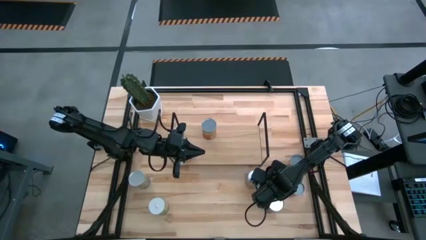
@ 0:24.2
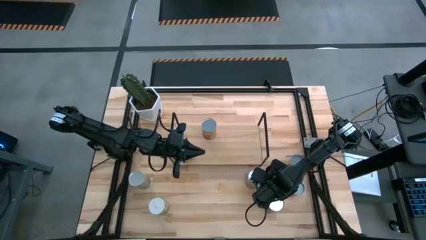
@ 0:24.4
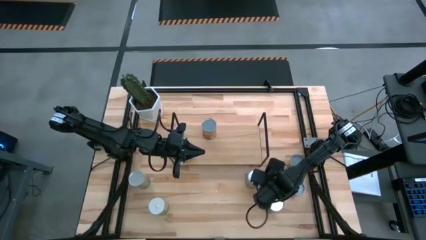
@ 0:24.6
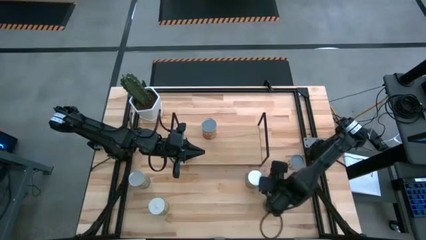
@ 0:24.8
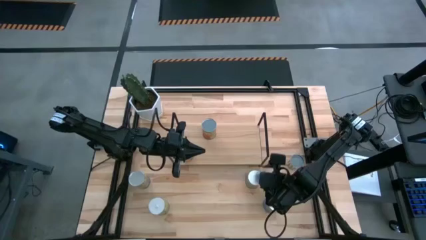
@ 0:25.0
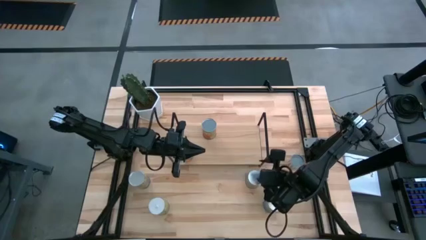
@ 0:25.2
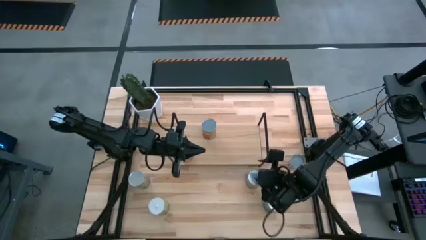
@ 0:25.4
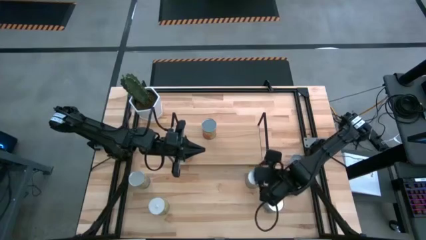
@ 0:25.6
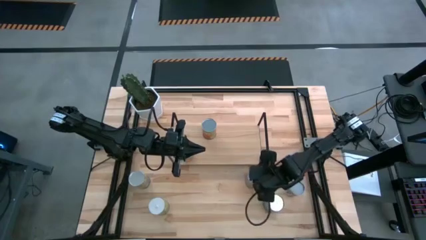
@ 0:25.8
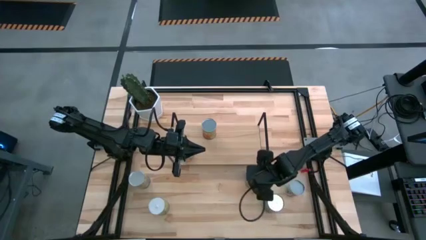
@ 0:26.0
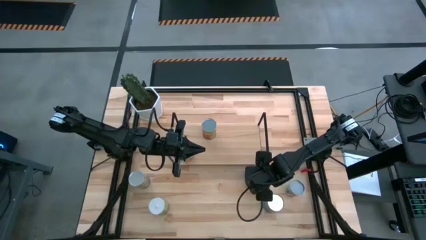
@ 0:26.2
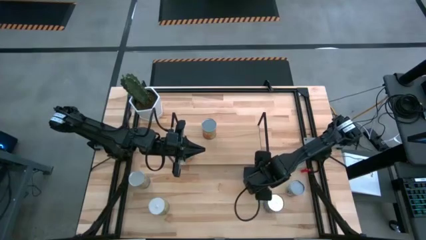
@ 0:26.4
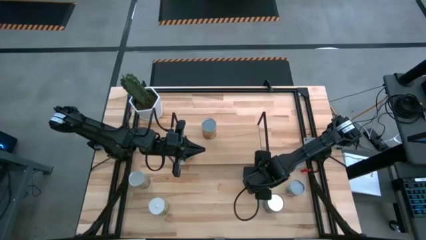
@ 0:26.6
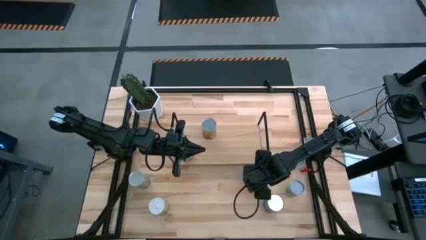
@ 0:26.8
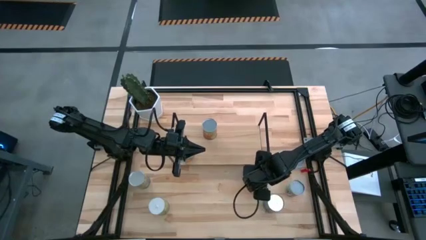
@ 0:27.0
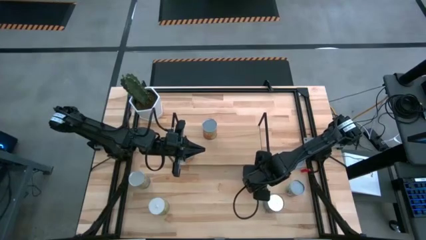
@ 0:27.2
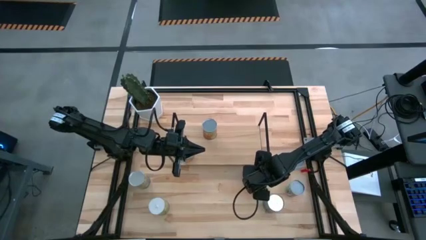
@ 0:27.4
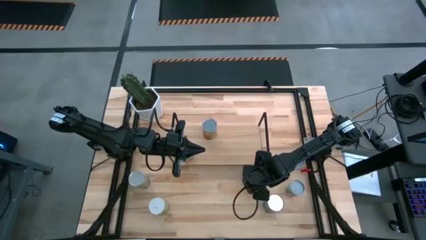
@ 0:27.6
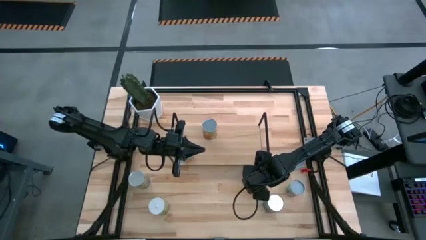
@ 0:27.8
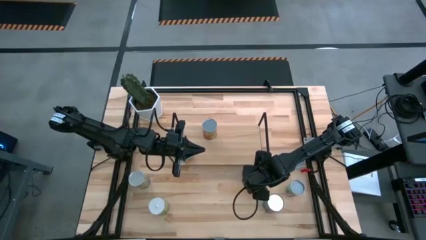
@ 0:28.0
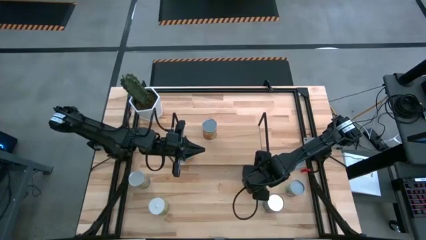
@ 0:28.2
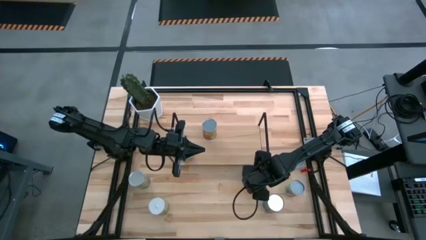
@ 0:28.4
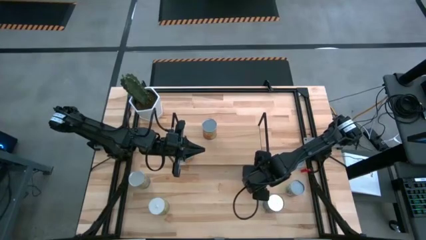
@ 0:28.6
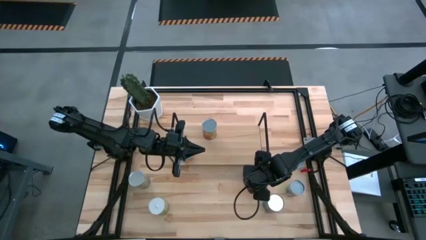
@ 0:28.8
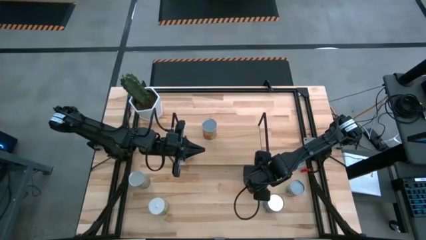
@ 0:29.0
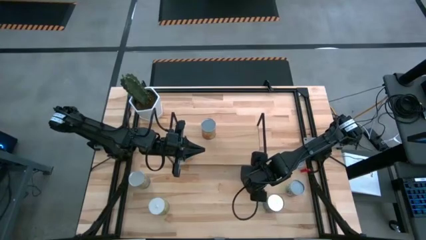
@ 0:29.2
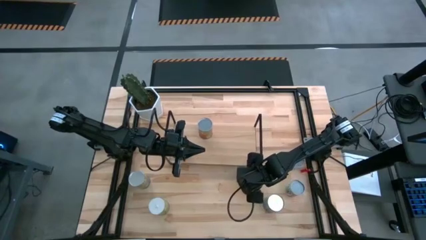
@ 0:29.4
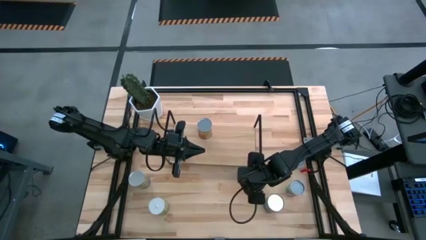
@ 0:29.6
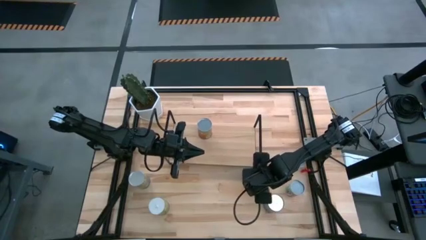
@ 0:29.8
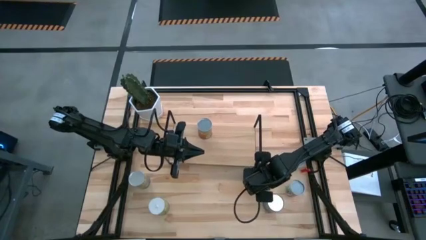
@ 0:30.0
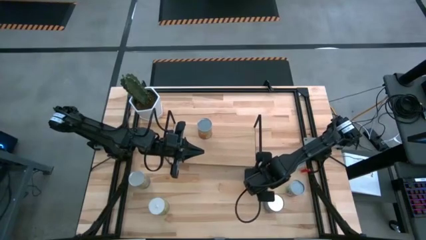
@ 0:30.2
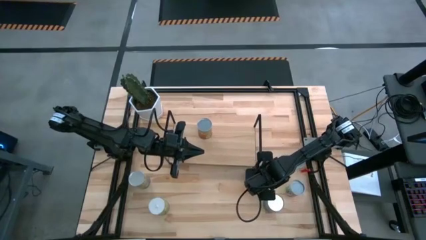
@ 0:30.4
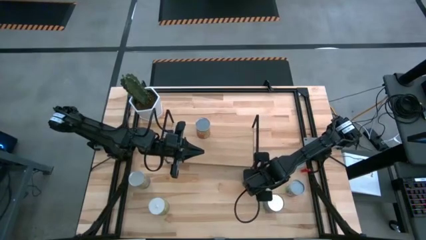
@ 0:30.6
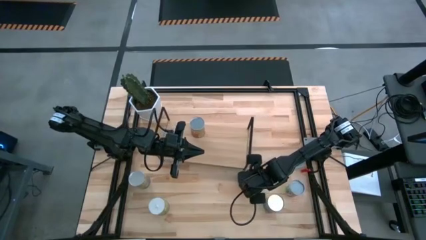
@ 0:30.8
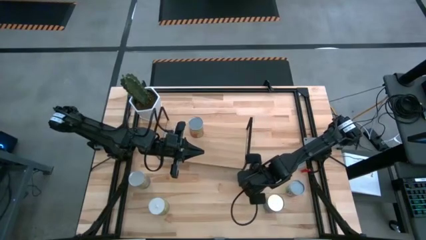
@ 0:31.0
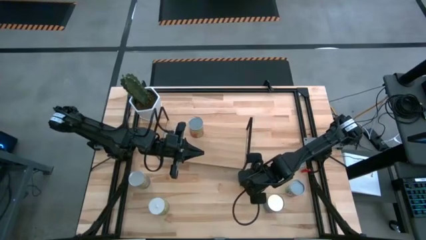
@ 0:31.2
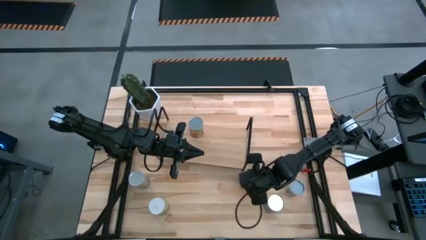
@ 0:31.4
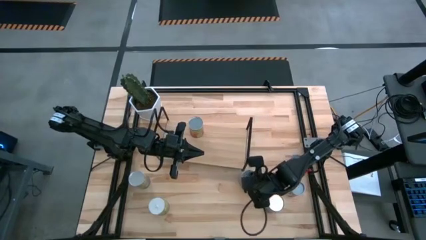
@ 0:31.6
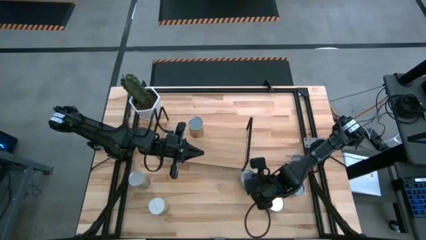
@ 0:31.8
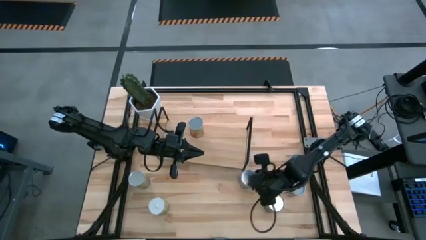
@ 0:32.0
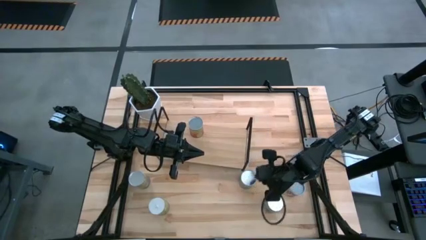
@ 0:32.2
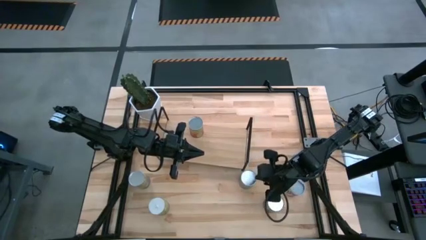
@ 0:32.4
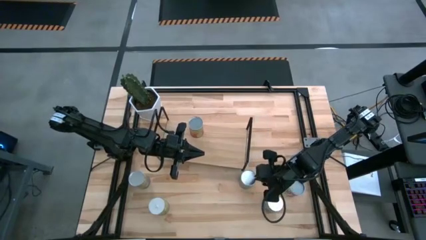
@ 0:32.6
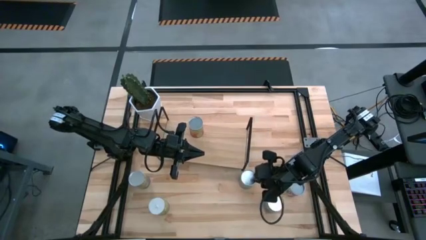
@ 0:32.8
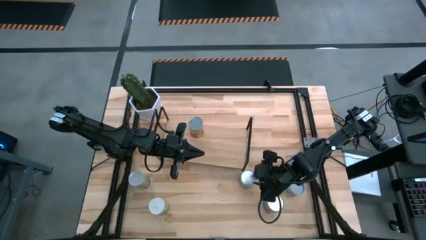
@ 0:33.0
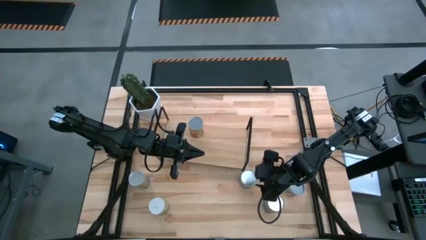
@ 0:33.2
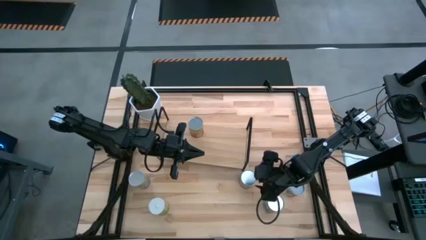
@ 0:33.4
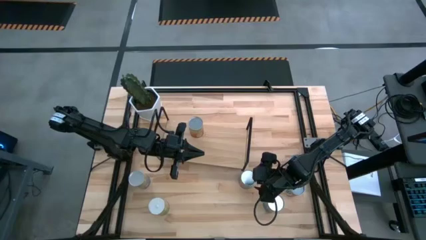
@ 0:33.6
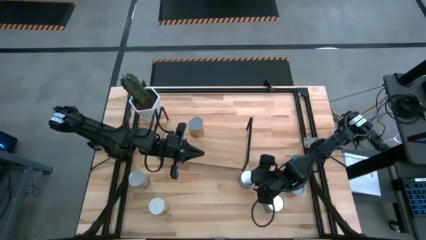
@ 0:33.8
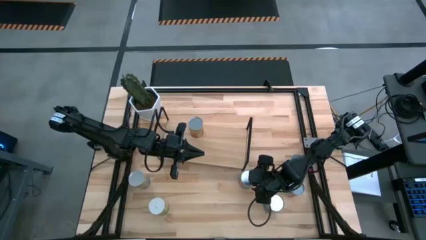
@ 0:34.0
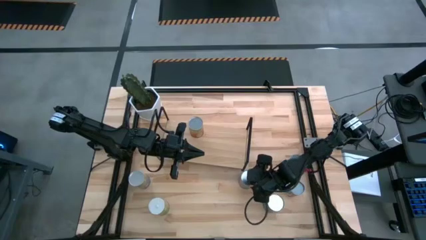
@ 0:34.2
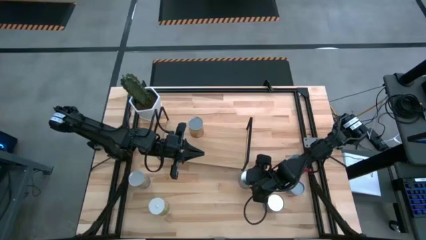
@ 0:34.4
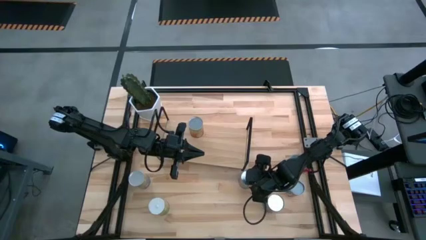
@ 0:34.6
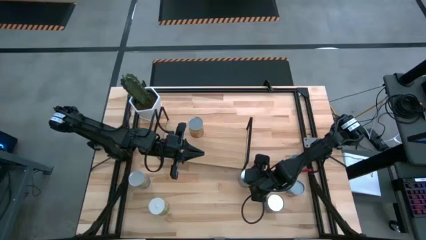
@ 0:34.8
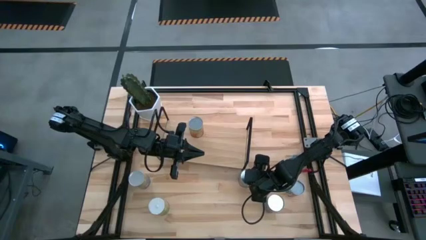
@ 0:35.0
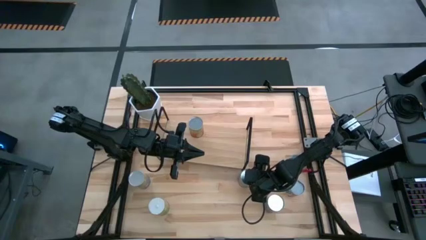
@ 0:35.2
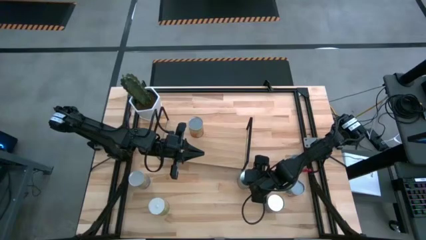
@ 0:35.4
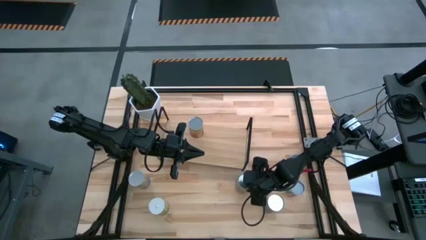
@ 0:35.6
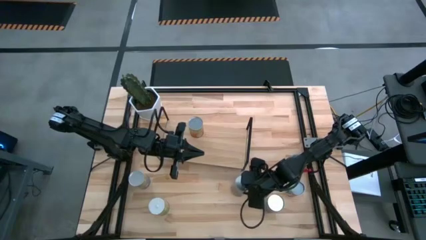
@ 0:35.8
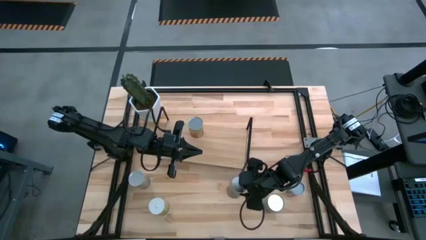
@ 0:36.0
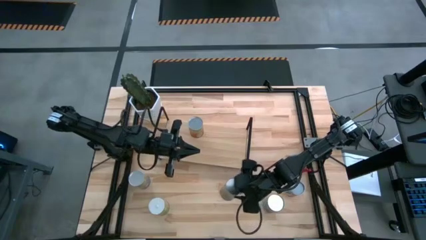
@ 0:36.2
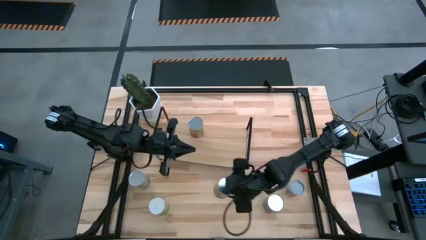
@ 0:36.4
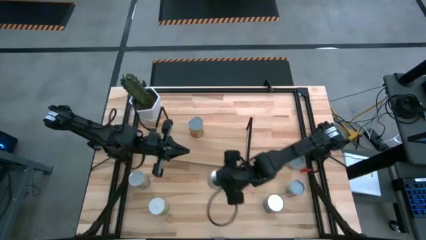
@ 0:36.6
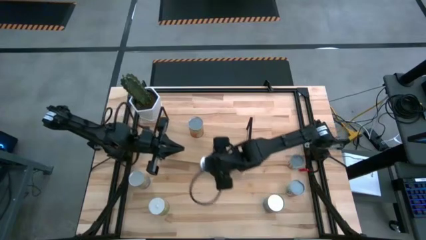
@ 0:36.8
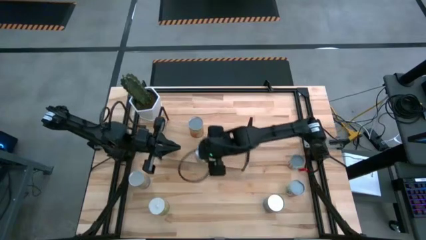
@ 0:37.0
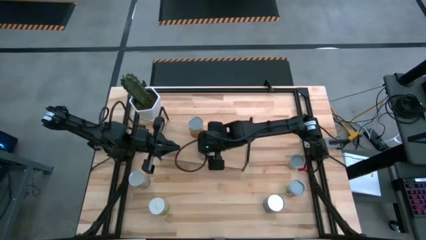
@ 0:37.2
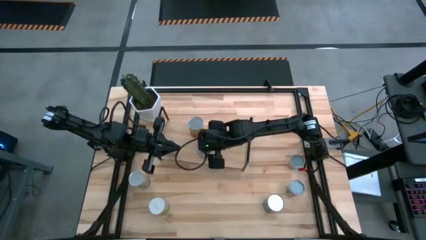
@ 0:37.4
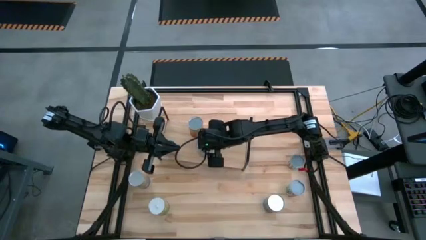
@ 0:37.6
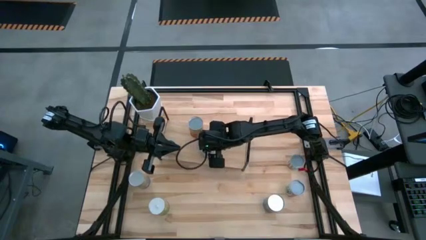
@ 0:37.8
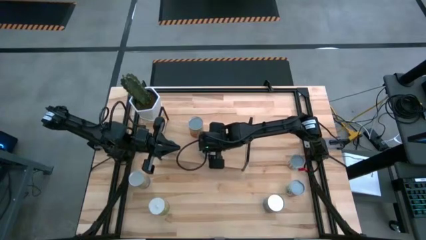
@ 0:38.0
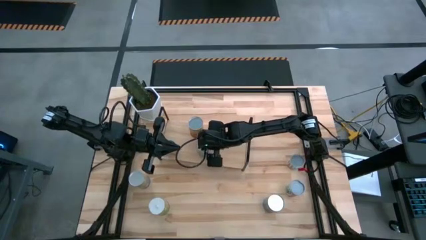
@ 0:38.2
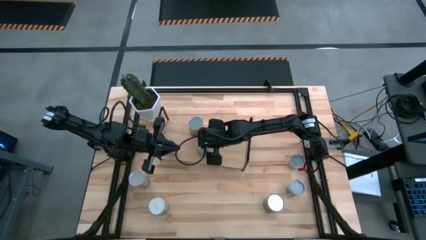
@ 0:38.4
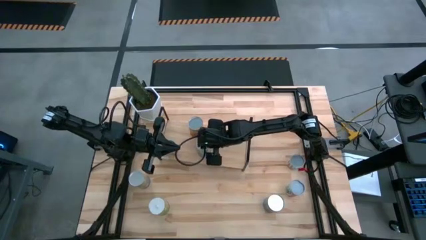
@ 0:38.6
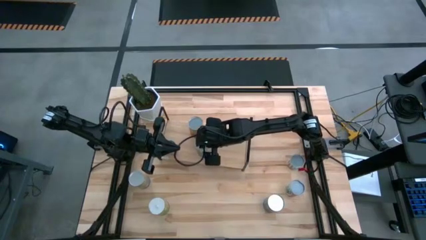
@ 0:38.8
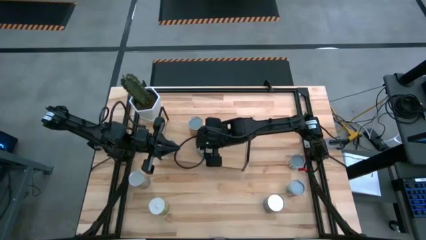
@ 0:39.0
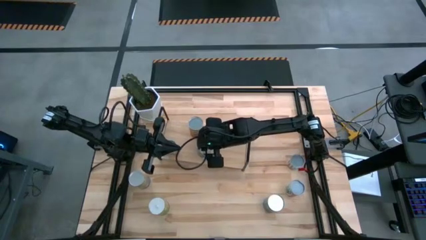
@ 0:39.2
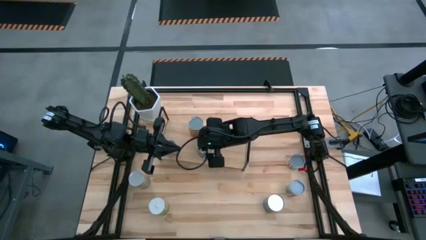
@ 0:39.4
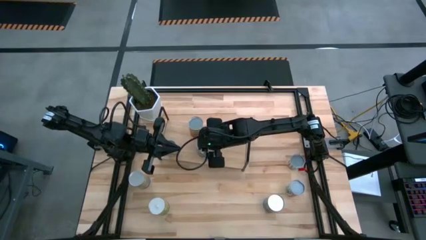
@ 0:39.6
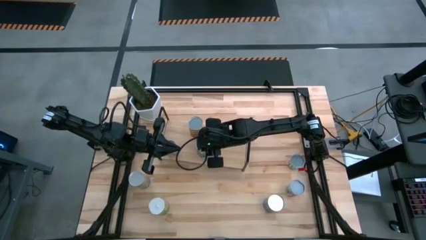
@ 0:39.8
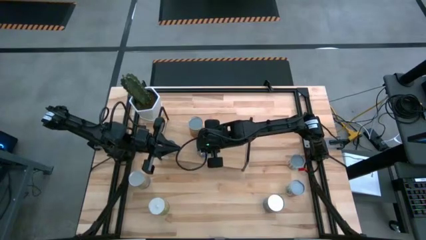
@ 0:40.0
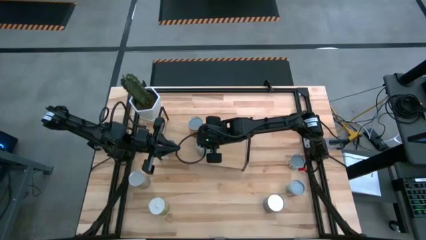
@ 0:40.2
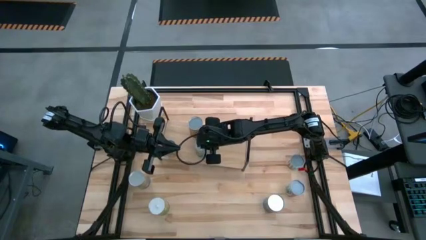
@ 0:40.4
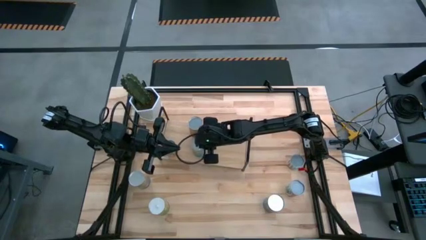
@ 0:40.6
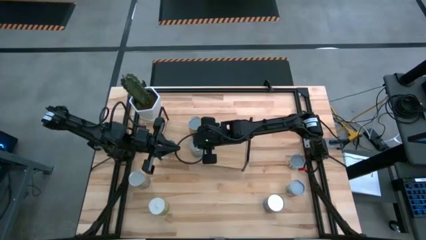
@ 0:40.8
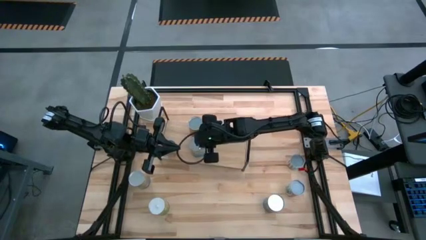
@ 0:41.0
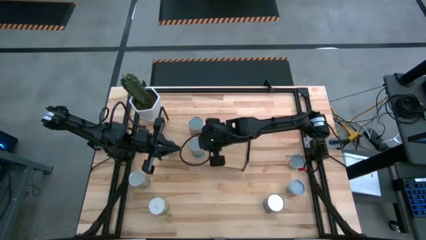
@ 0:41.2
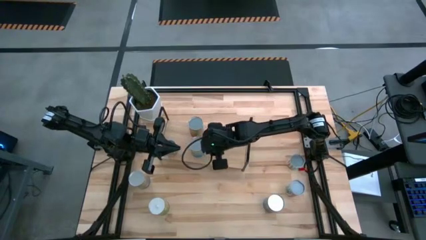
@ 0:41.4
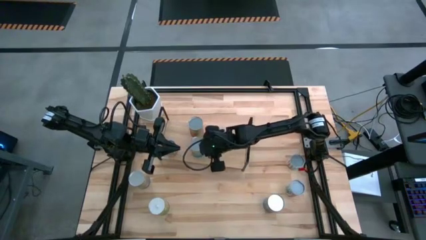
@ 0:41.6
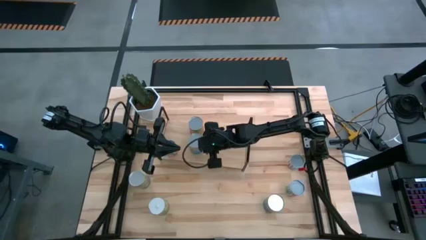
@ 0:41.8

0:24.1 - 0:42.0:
Task: Pick and place cans onto a shelf
Put the canned tomatoes on the shelf
